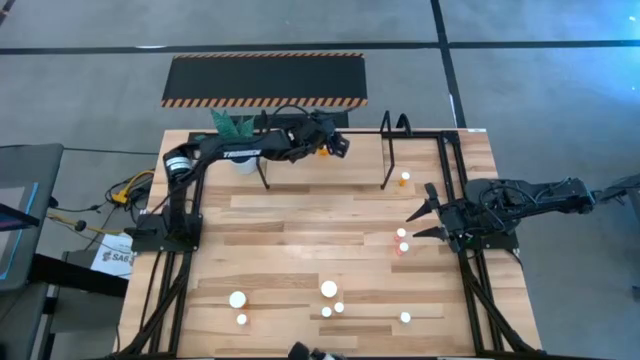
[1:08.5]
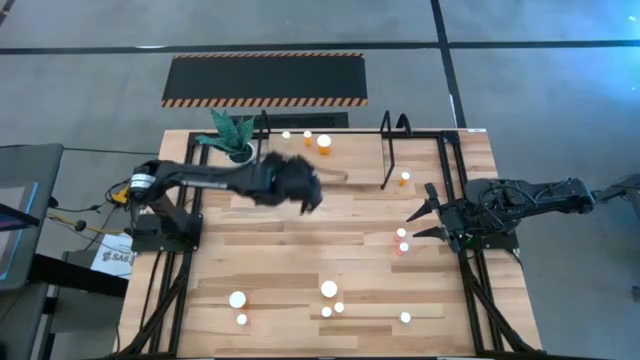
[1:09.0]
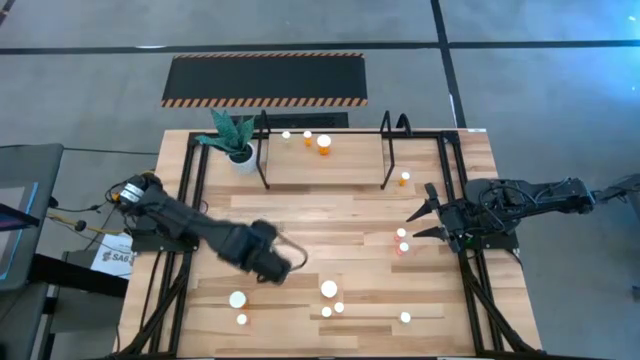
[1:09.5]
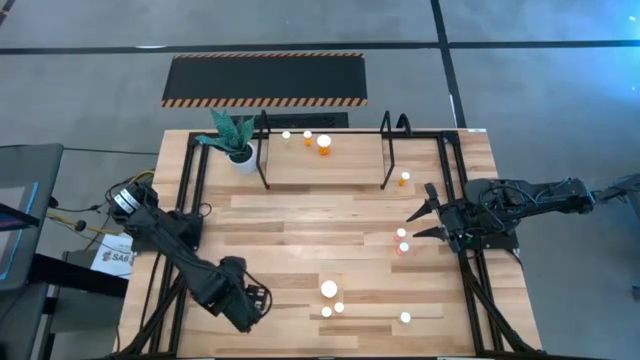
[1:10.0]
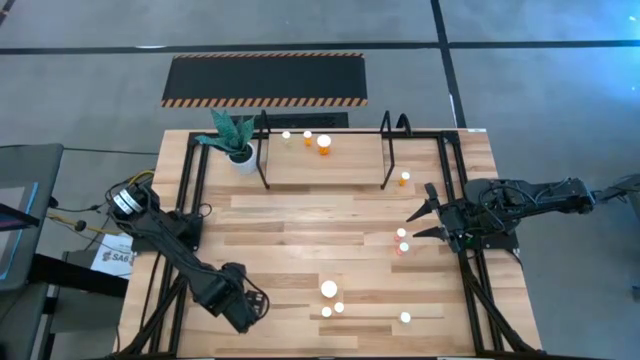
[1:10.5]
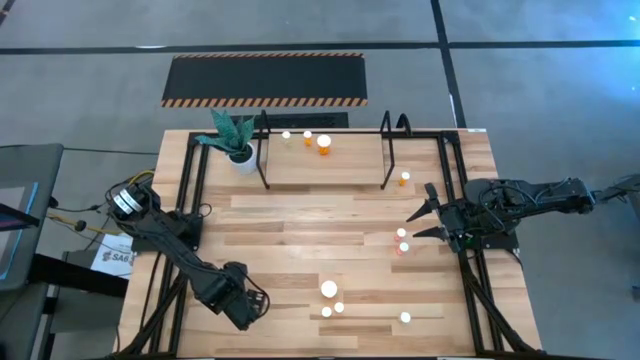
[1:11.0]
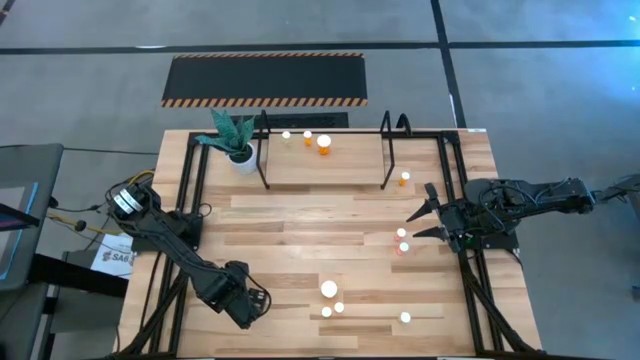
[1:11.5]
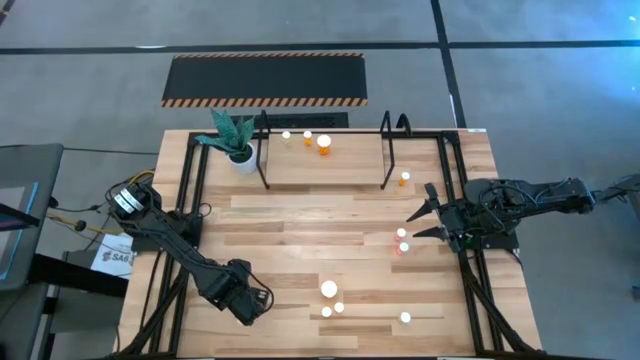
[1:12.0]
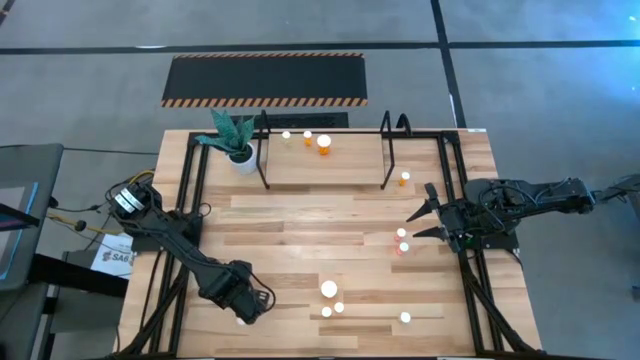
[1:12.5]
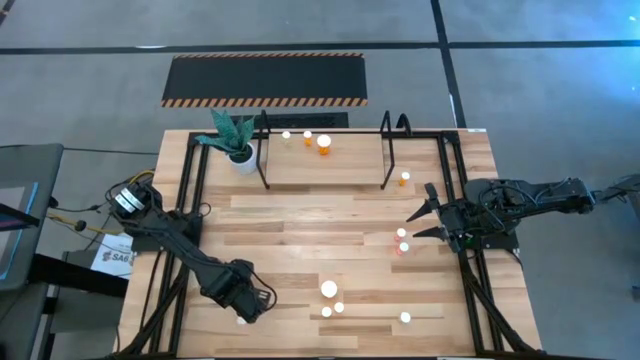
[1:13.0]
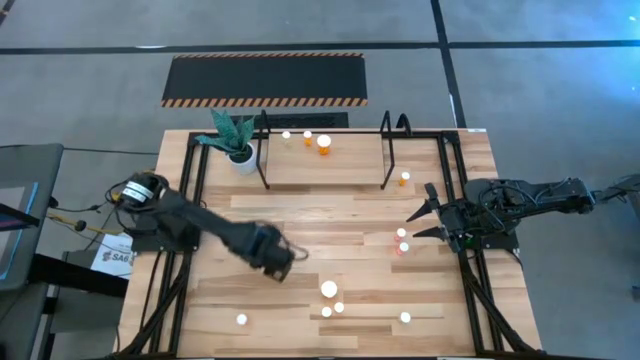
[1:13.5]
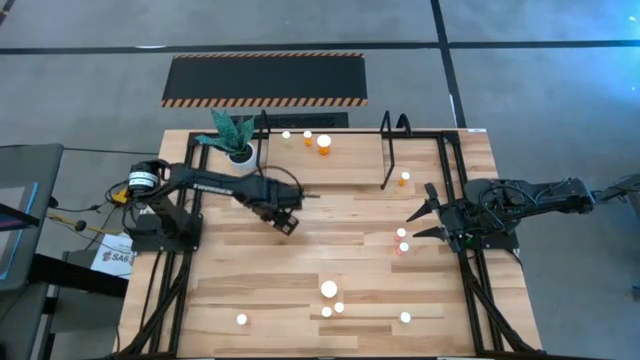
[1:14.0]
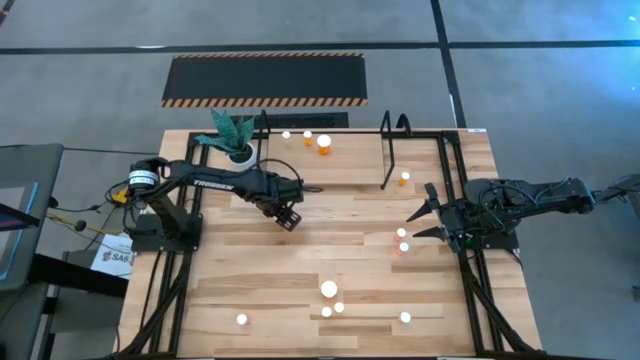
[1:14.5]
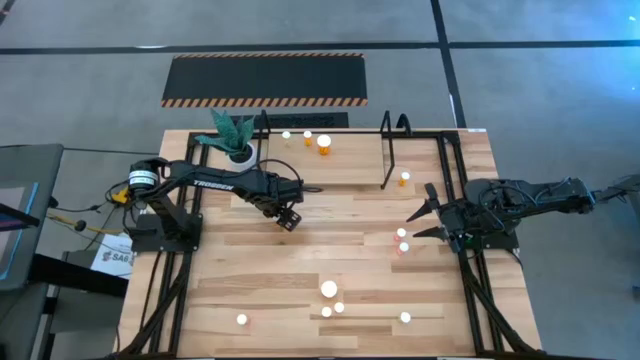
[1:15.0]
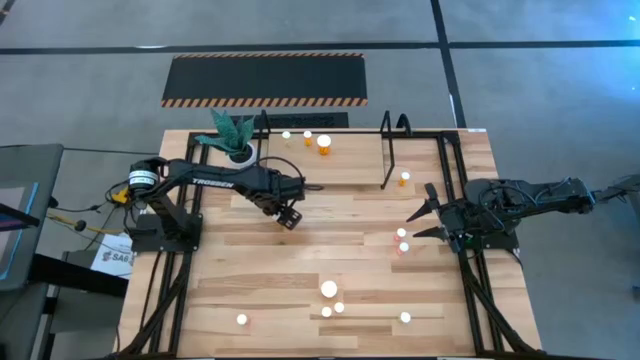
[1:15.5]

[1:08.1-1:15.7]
Task: Pick and place medicine bottles onto shelf by color
Move the left big orange pill bottle to the top left of the table

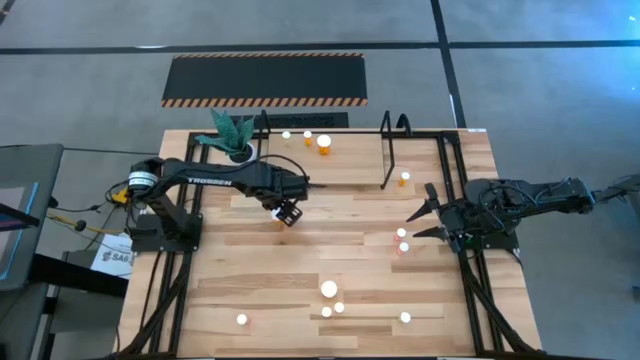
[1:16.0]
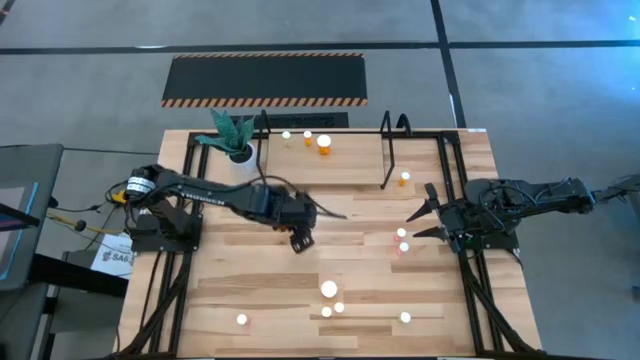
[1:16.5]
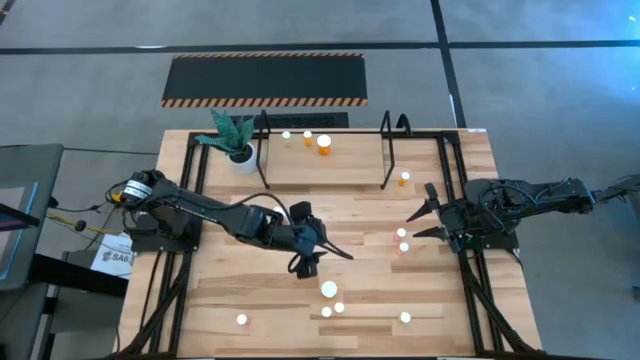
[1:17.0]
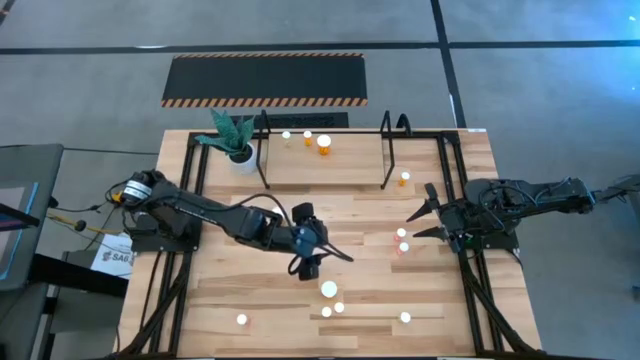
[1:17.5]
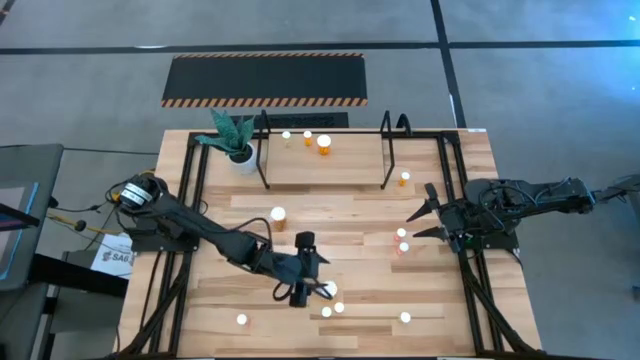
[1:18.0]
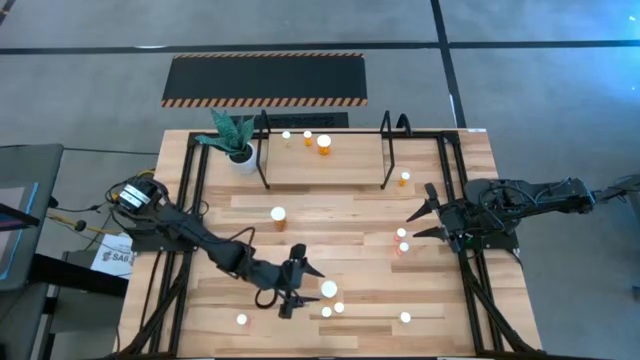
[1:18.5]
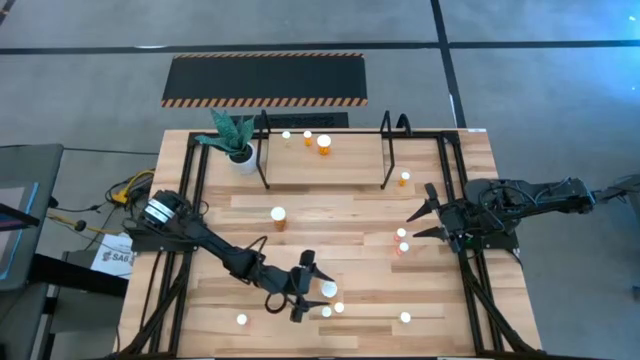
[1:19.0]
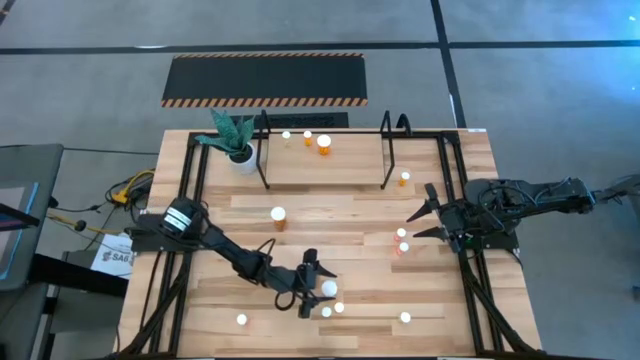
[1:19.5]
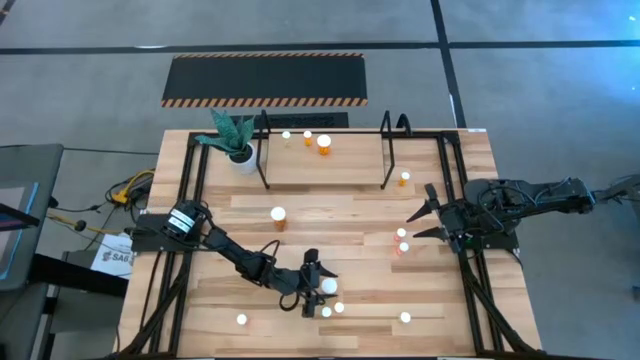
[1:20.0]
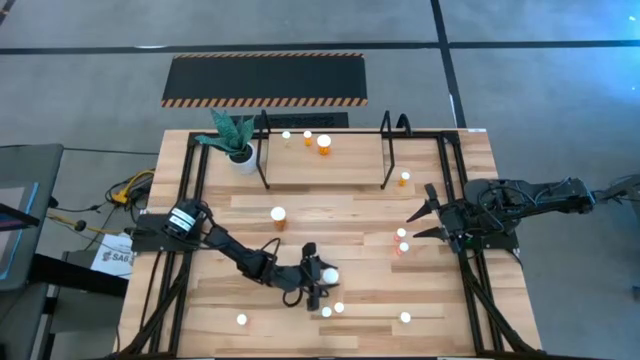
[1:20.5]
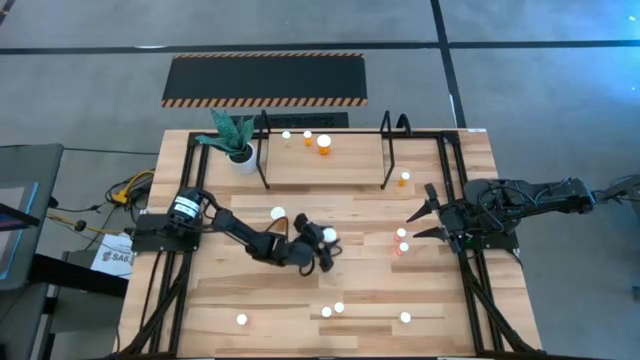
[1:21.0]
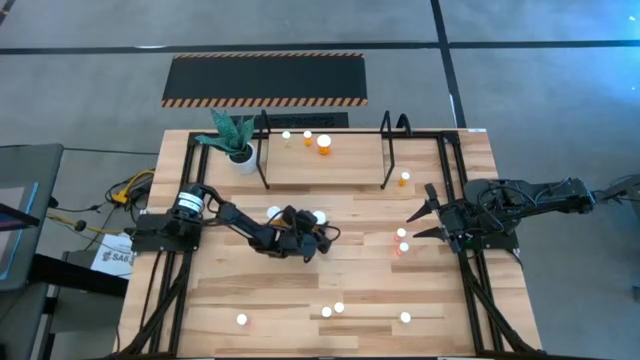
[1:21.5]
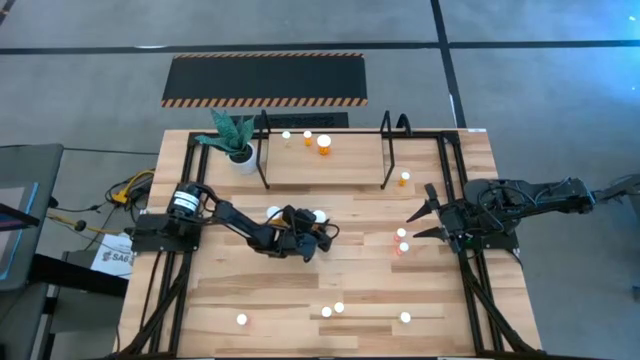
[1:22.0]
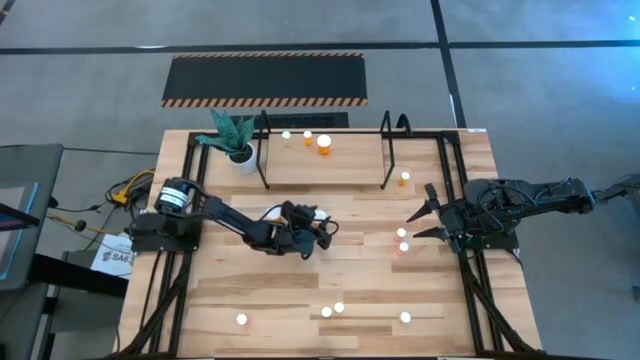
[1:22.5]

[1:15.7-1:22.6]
Move the bottom big orange pill bottle to the top center of the table

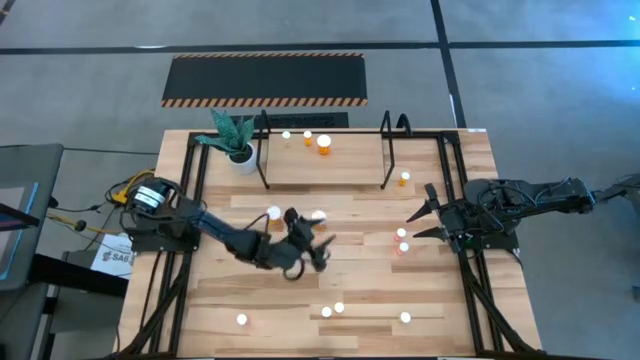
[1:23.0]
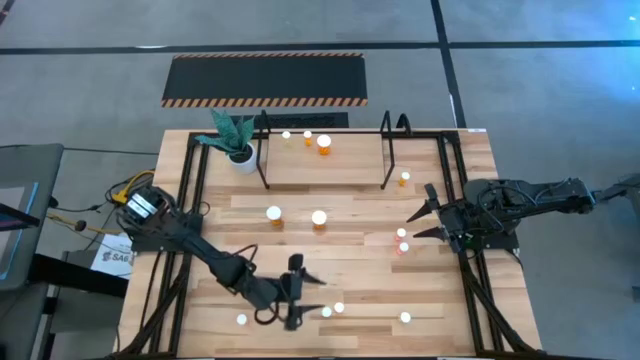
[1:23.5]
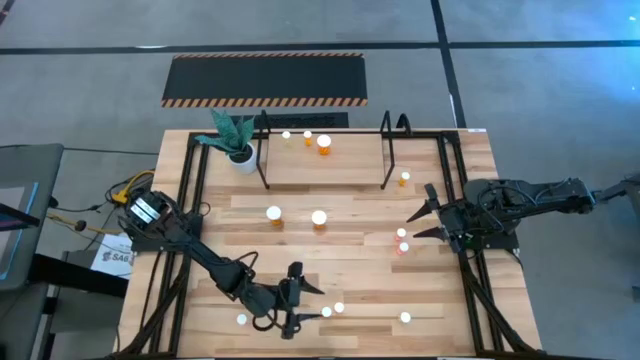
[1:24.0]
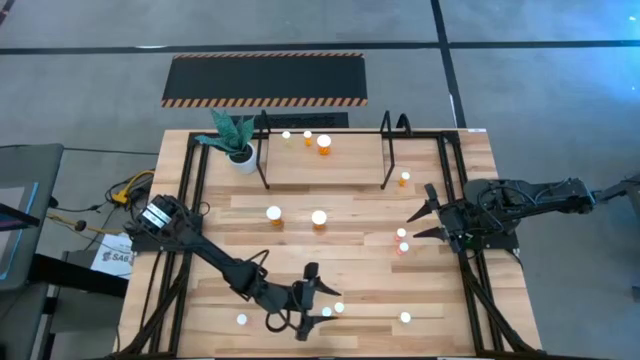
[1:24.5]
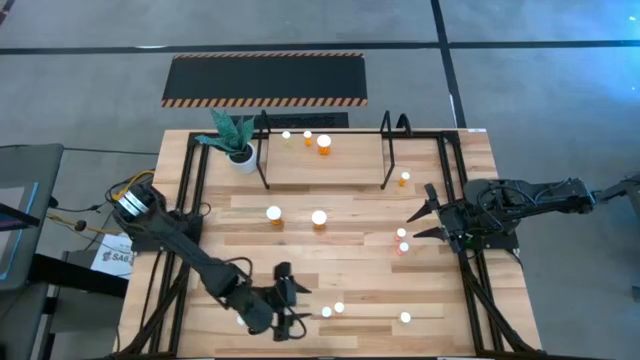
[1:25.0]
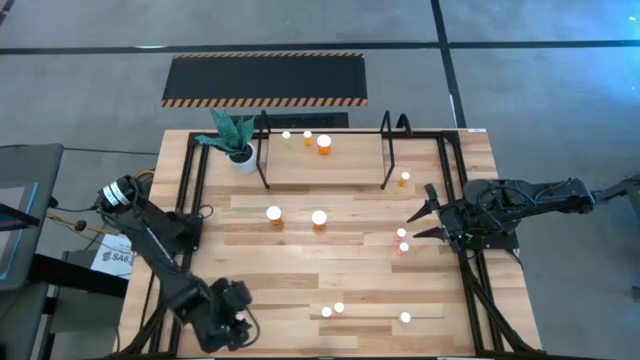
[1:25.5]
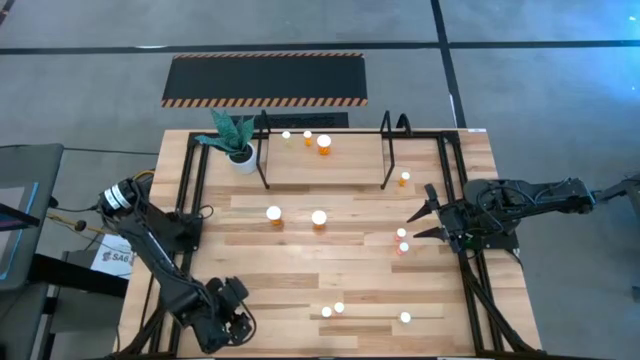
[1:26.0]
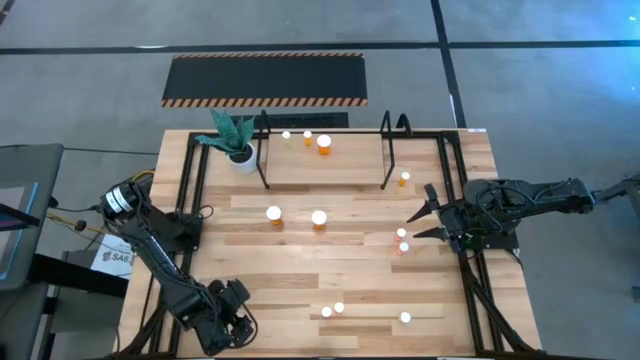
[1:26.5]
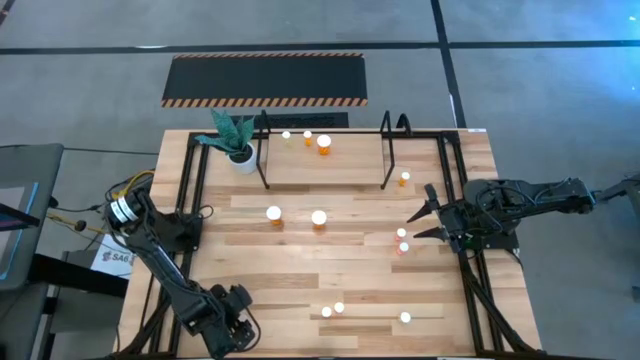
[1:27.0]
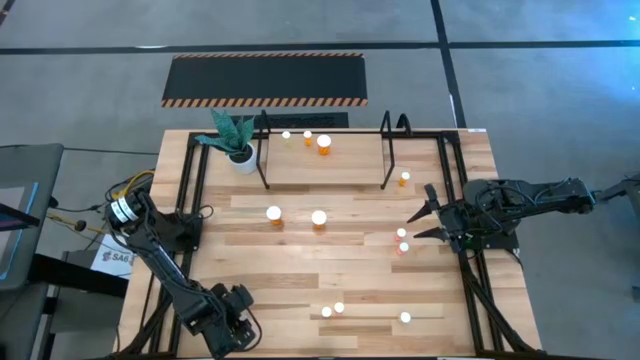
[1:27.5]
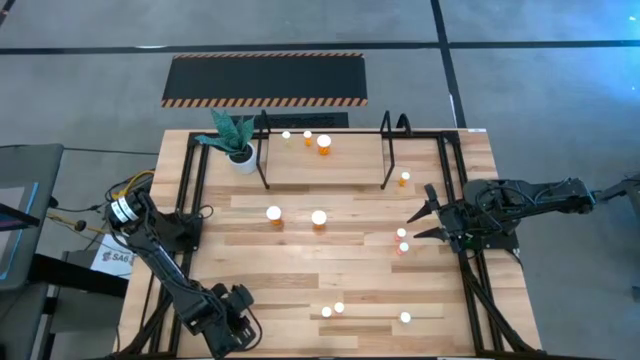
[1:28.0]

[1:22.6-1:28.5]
Put the bottom left pink pill bottle on the shelf
